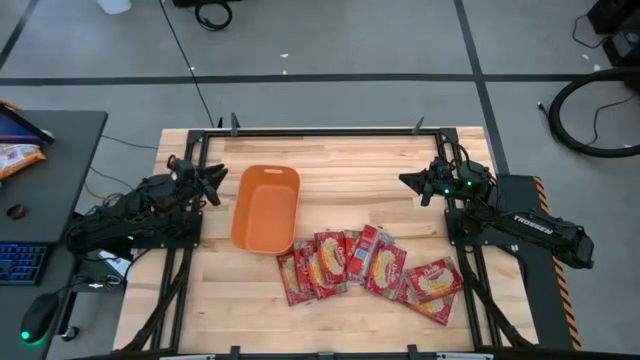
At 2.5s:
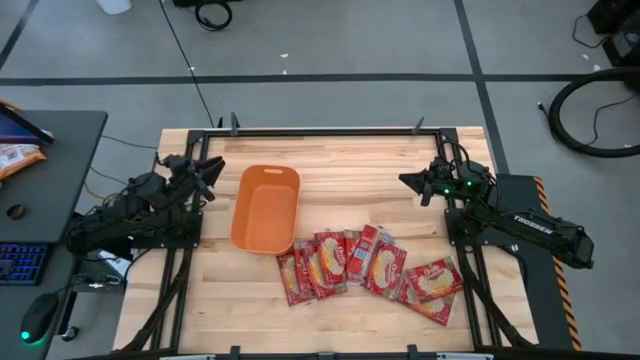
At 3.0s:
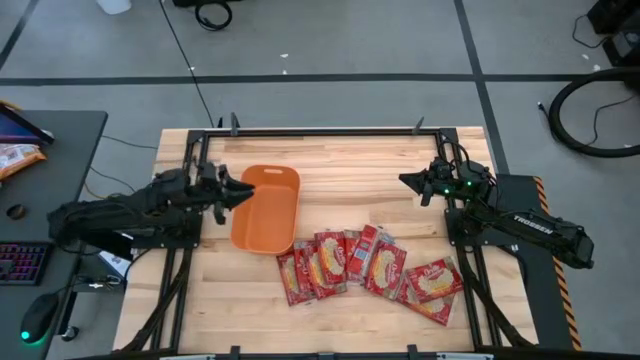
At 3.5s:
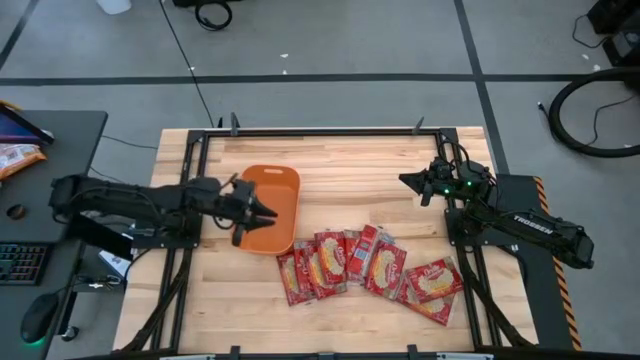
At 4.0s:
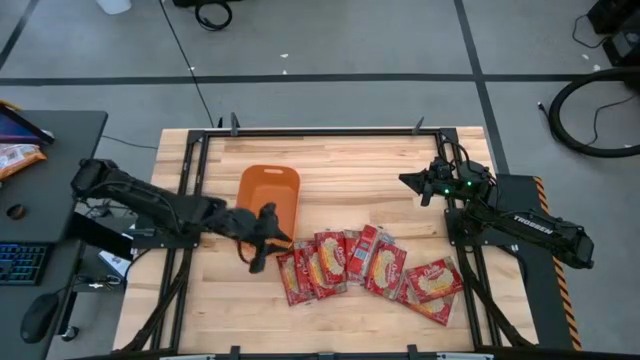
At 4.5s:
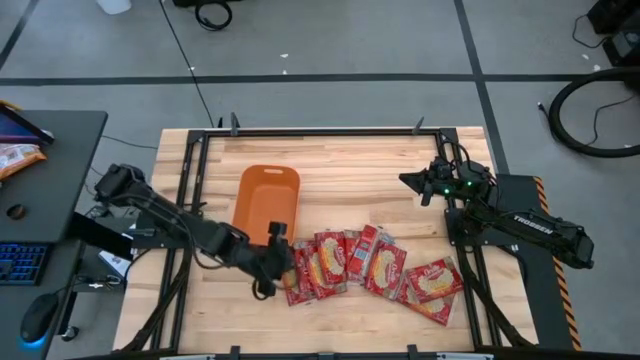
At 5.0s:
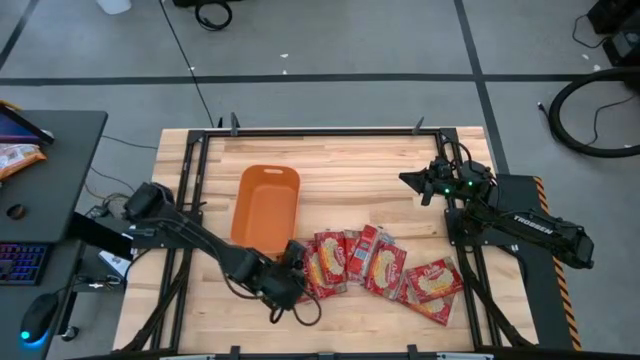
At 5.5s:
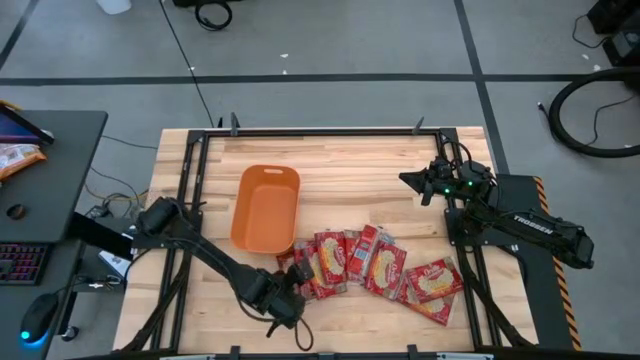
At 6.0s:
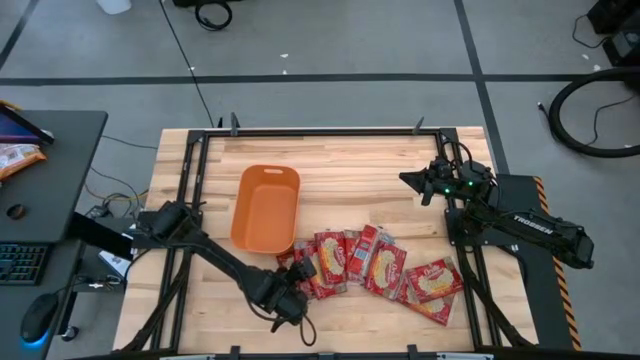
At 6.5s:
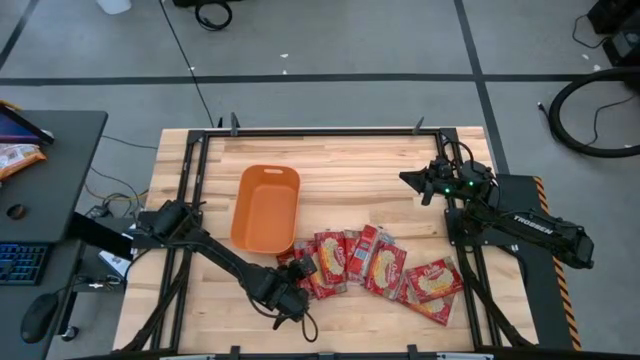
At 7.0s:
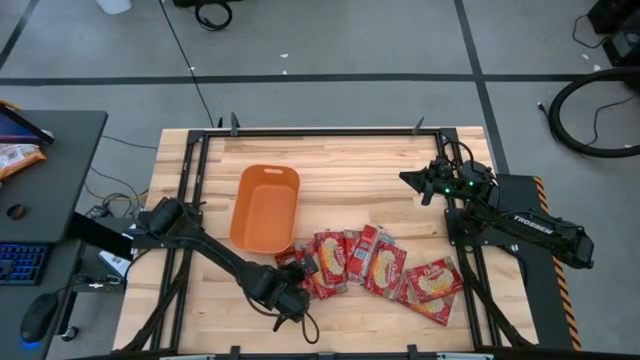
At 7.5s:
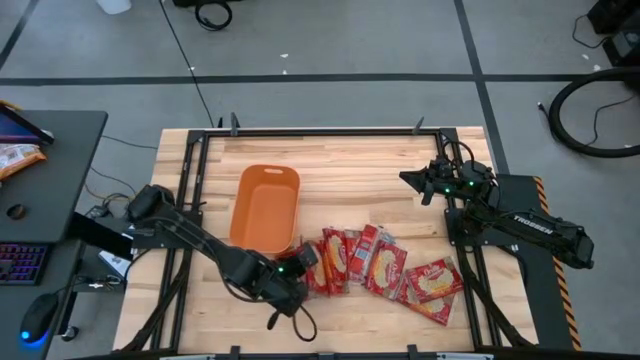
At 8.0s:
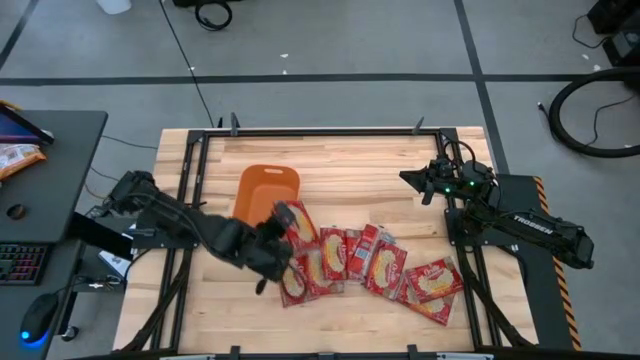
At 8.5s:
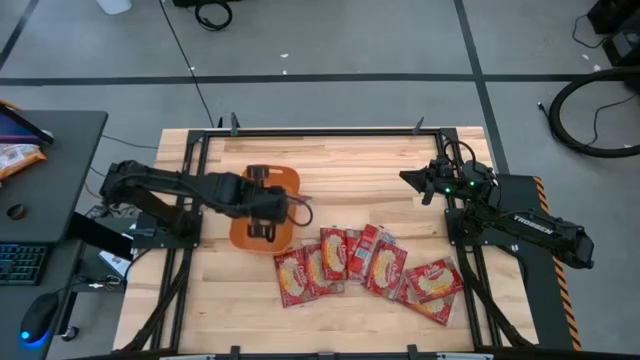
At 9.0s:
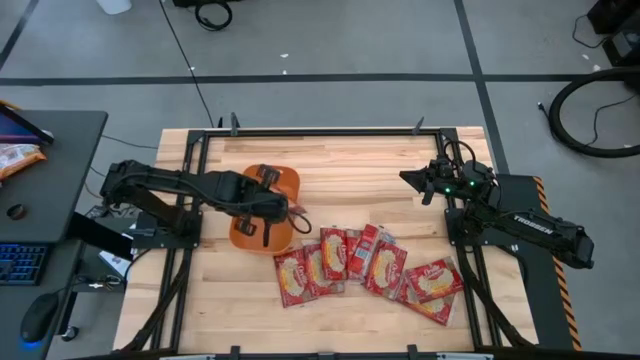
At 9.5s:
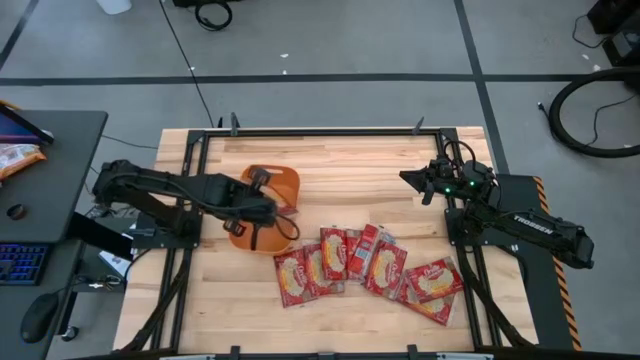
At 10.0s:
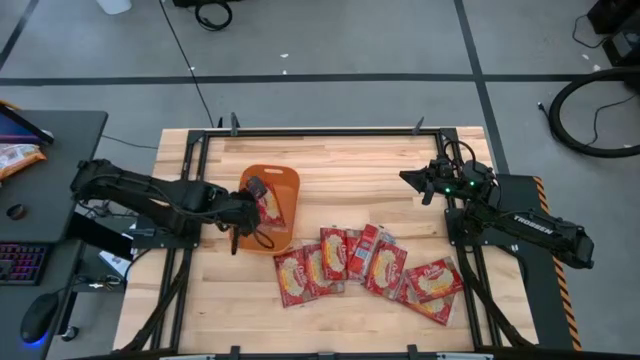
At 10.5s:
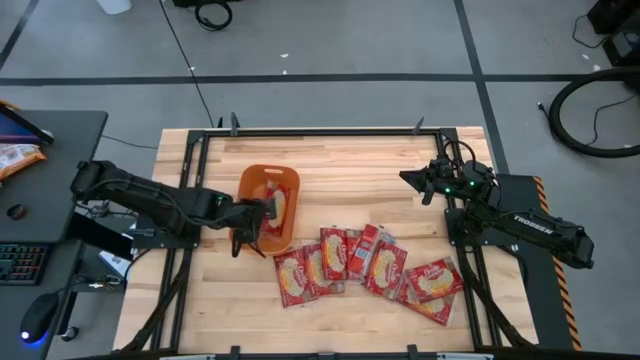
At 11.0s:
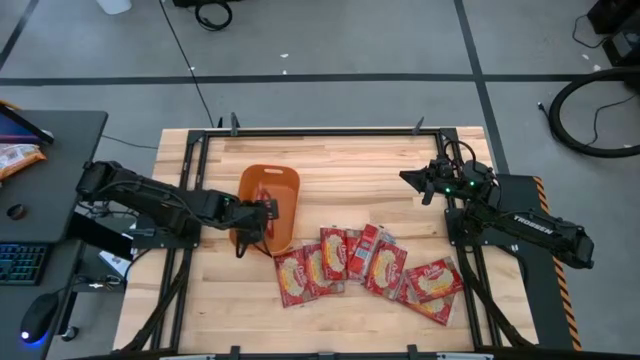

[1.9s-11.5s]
Task: Sort popcorn bags into baskets
Put the red popcorn bag into the orange bin

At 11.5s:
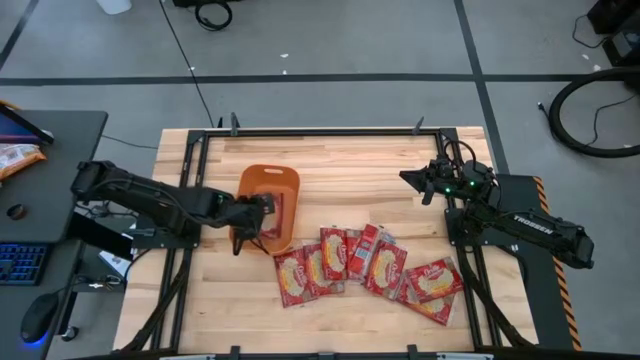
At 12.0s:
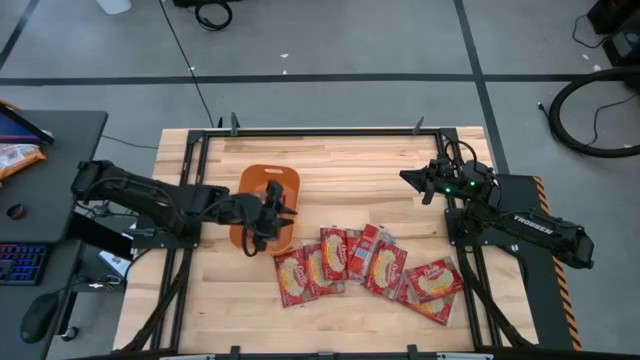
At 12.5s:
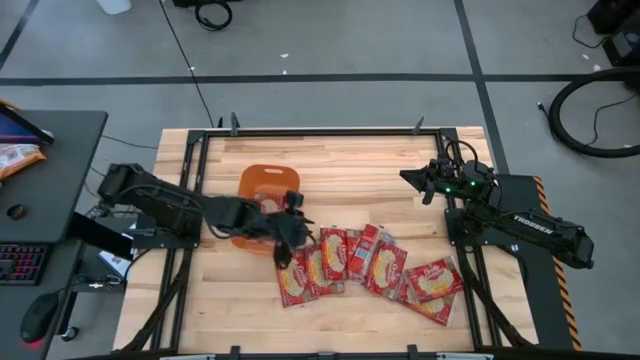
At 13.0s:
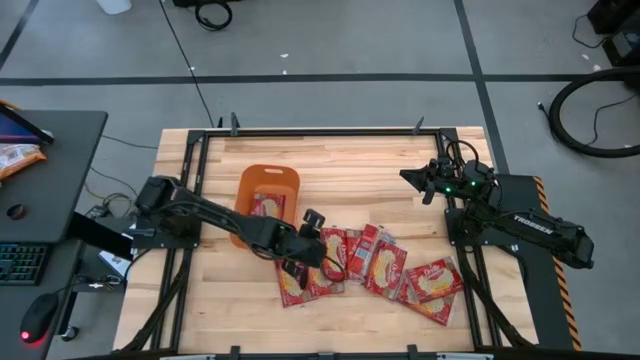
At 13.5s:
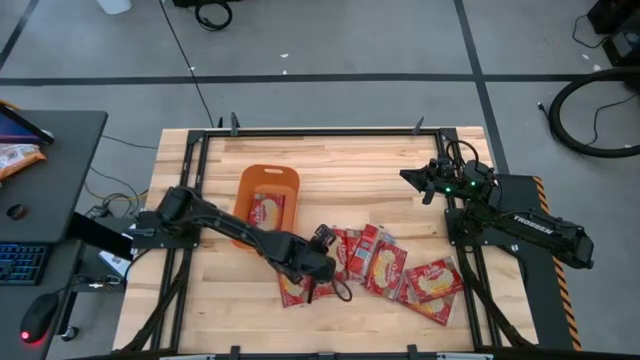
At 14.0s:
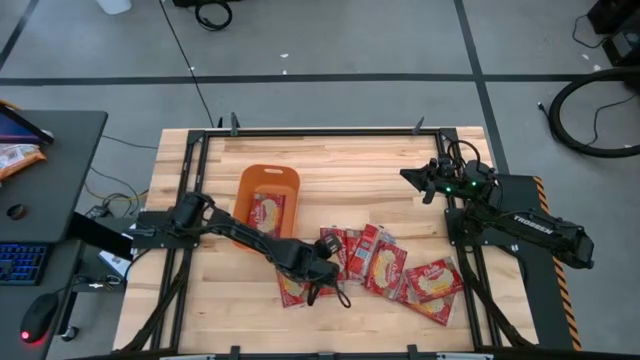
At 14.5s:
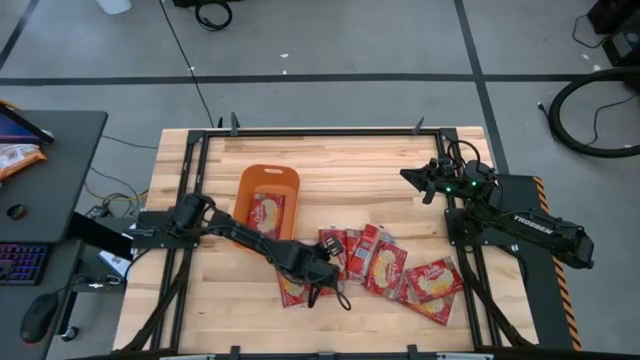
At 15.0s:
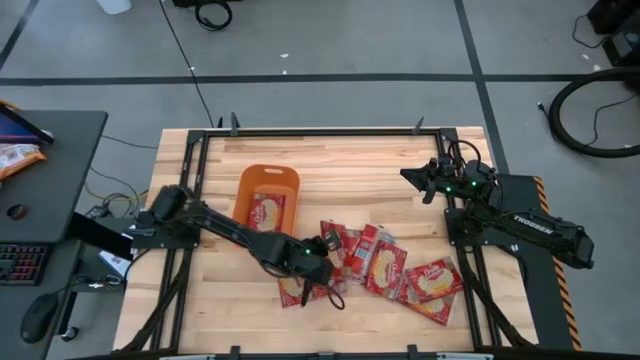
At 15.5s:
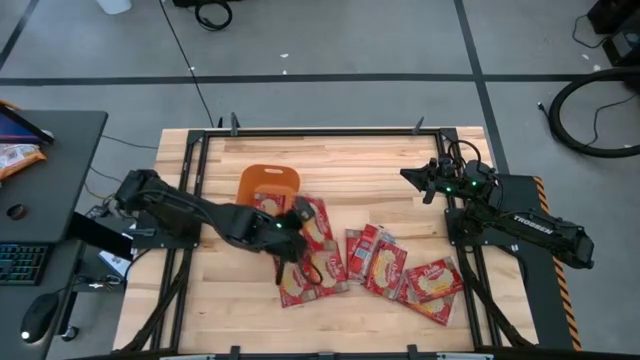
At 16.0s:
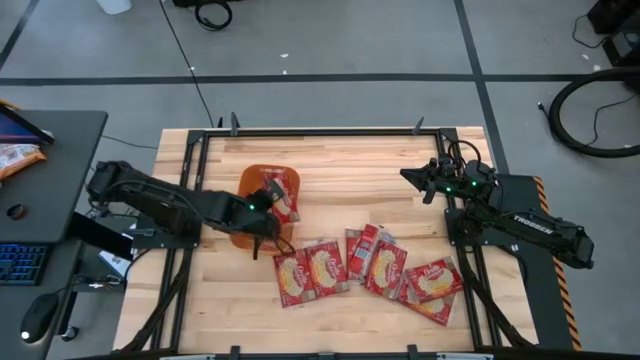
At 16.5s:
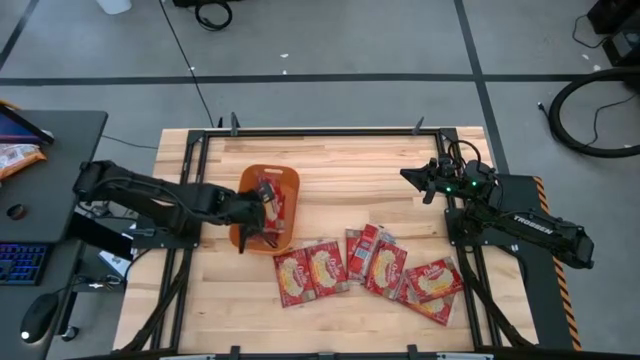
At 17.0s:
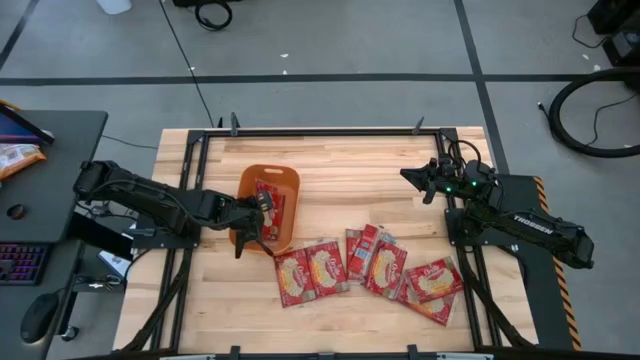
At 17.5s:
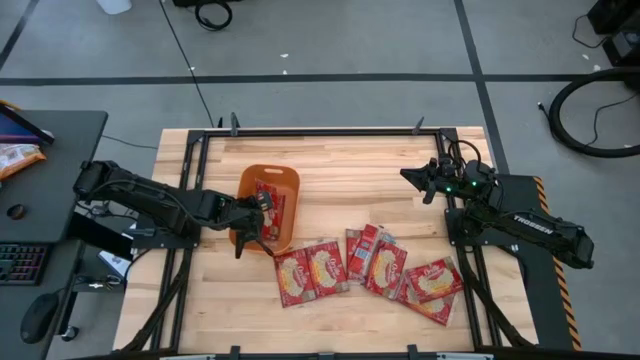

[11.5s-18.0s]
Put the red popcorn bag into the orange bin

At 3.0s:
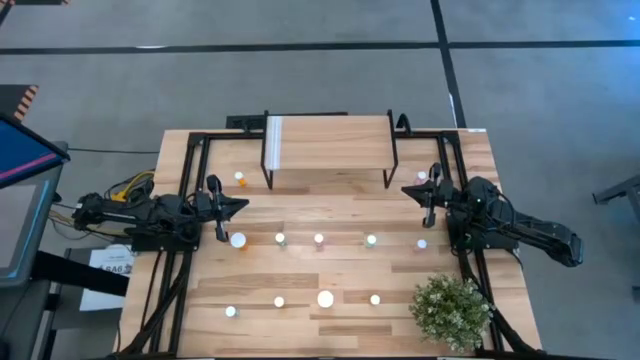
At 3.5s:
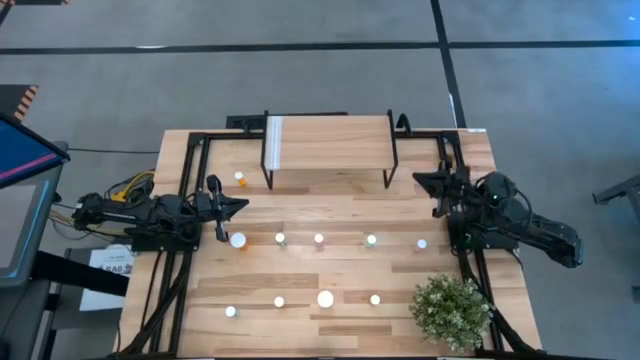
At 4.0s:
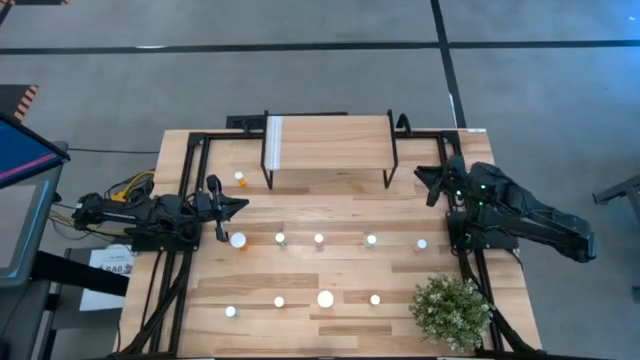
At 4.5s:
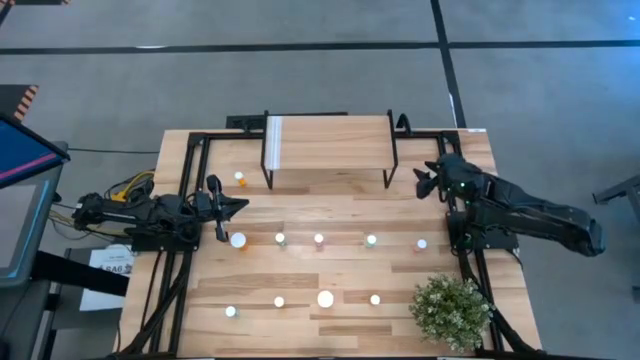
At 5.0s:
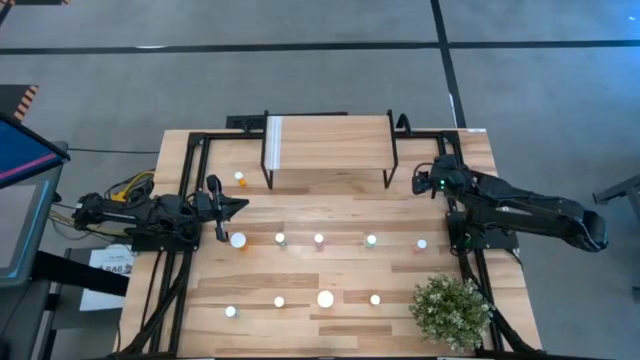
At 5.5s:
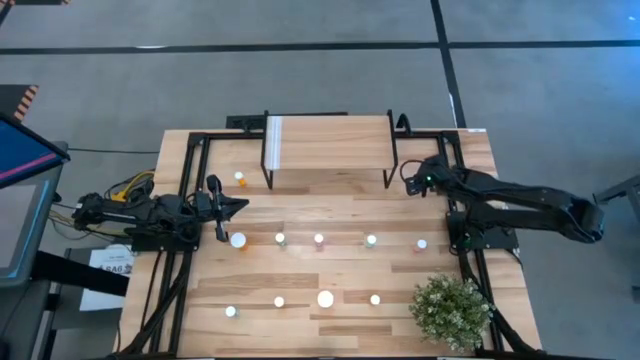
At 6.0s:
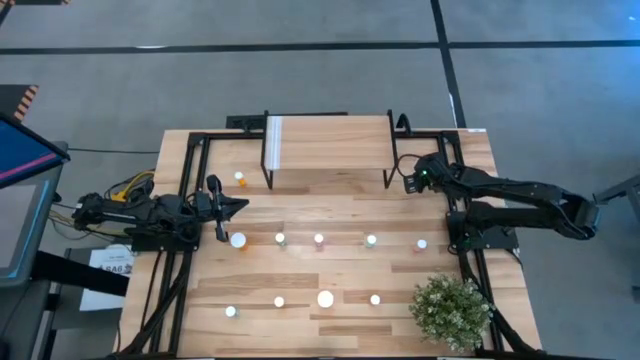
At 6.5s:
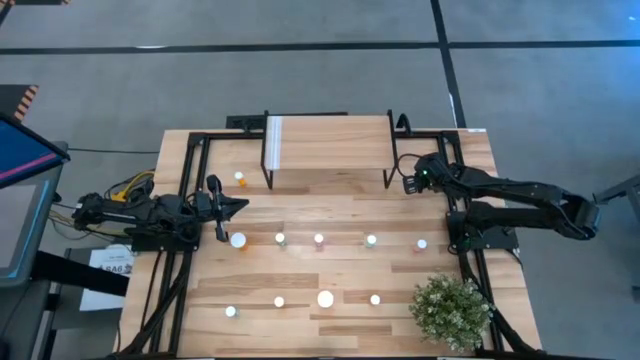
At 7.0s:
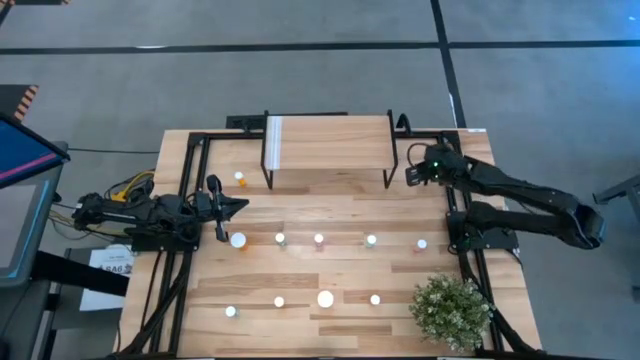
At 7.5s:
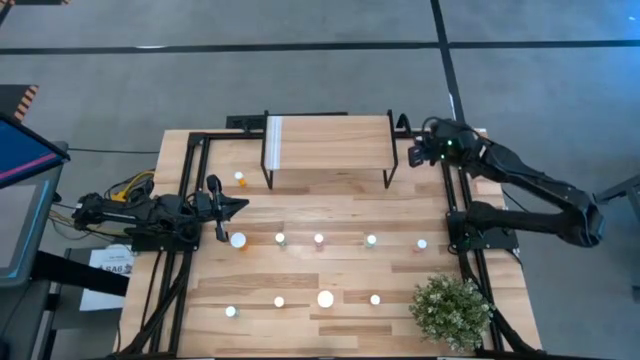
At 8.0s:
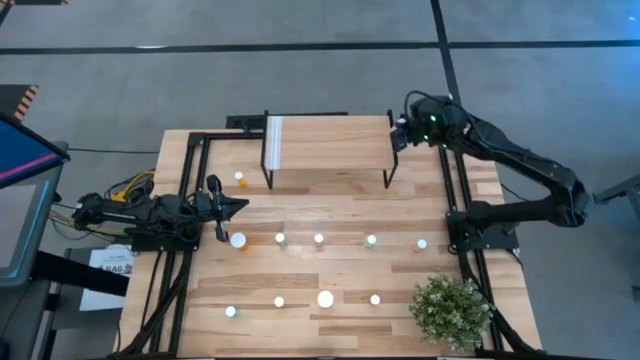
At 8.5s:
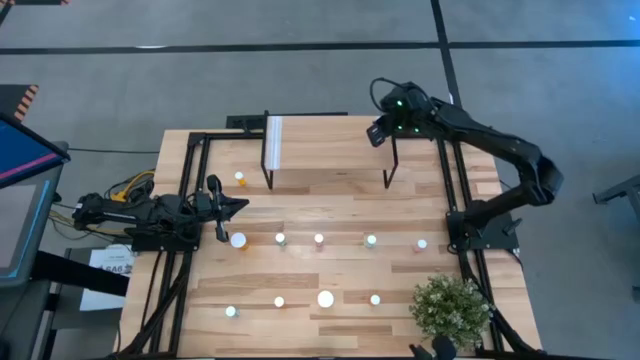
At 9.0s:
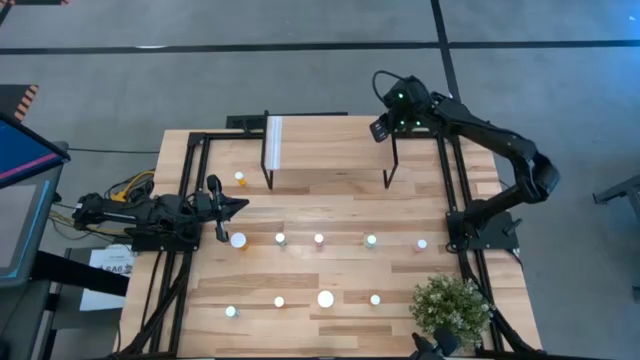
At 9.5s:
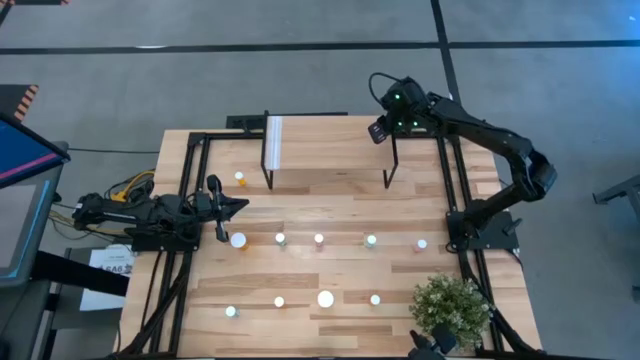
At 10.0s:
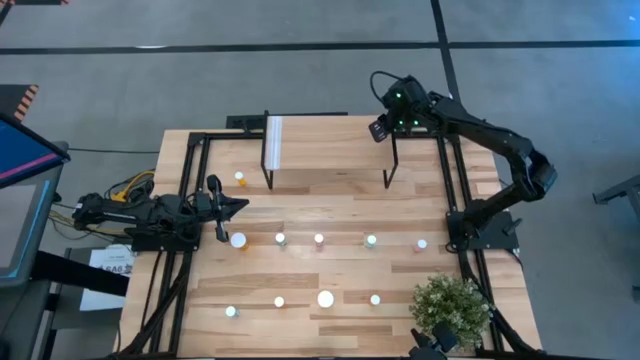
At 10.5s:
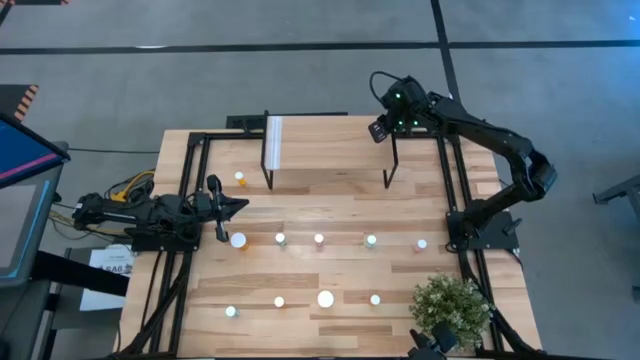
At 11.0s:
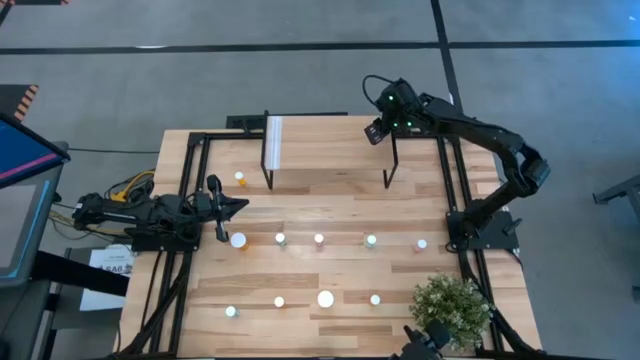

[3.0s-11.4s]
Task: Pick and place medicine bottles onto shelf by color
Put the top pink pill bottle on the shelf
